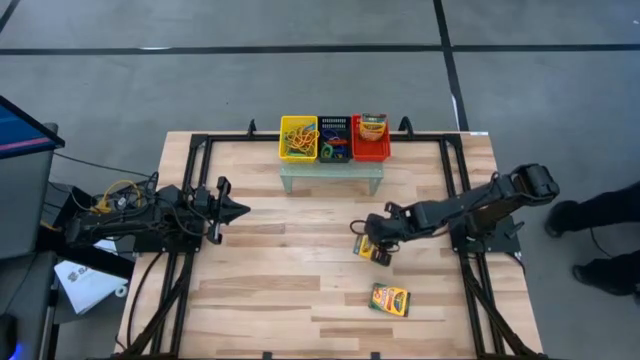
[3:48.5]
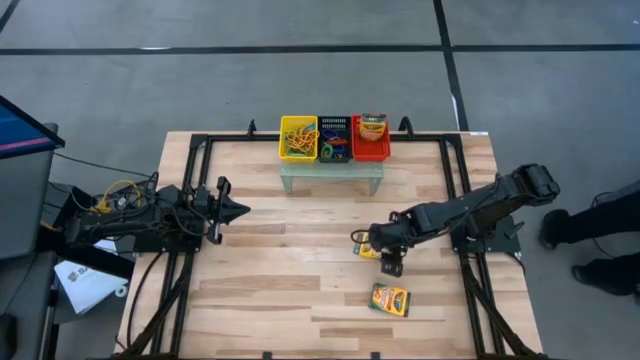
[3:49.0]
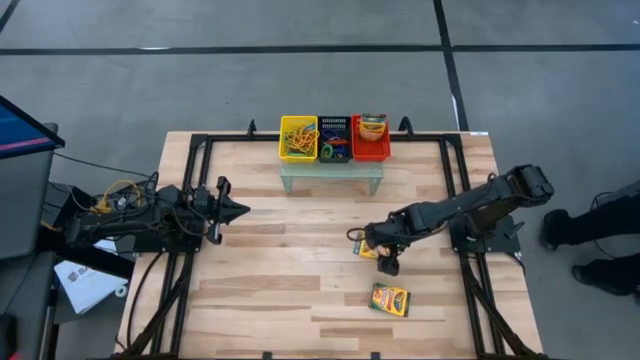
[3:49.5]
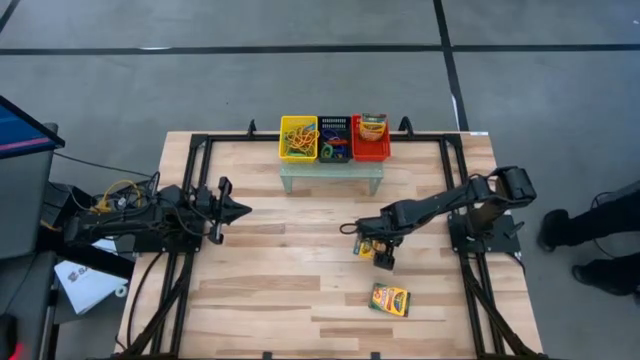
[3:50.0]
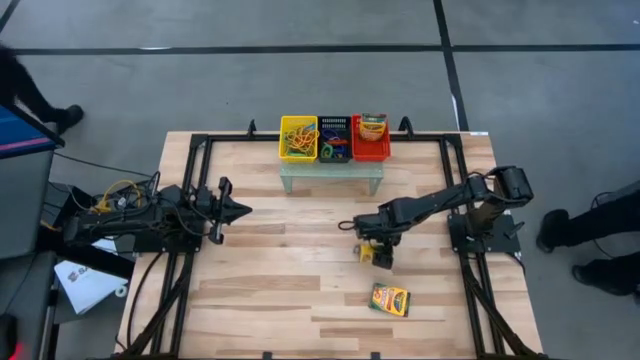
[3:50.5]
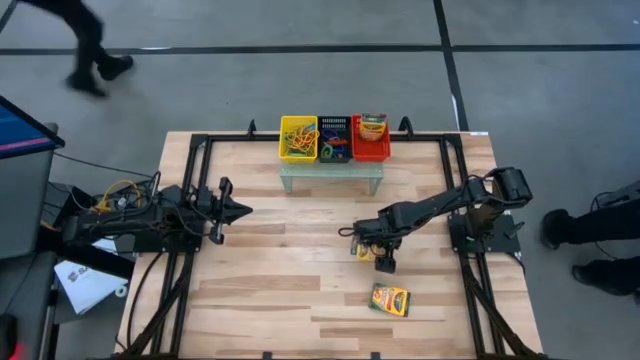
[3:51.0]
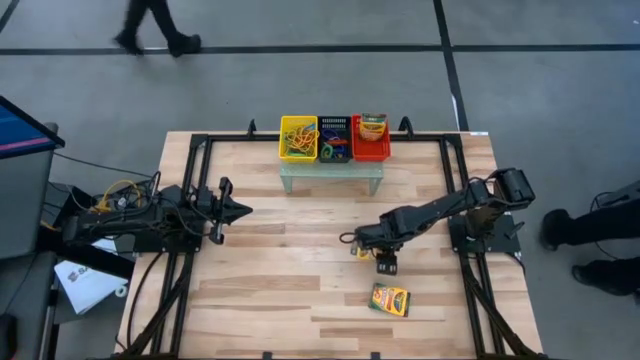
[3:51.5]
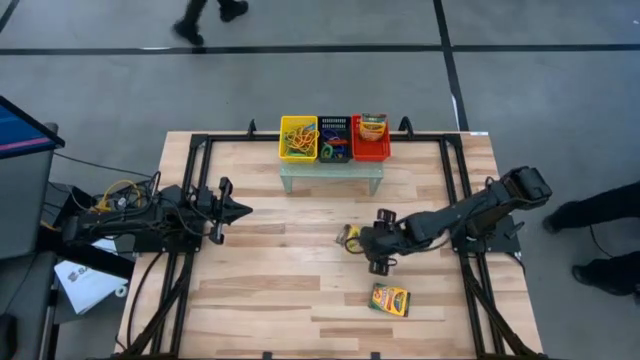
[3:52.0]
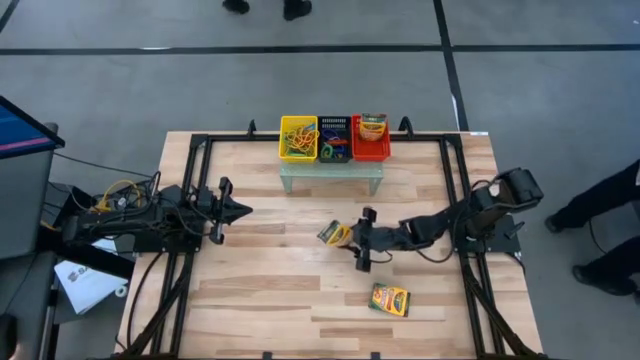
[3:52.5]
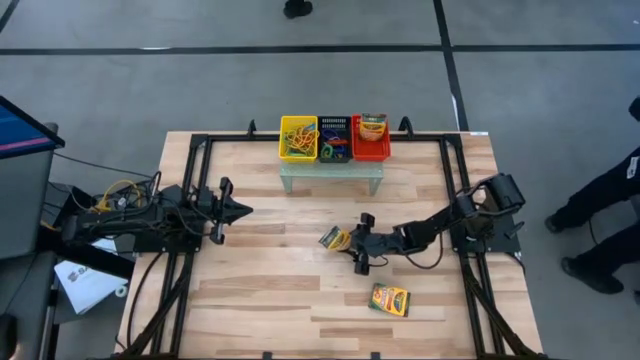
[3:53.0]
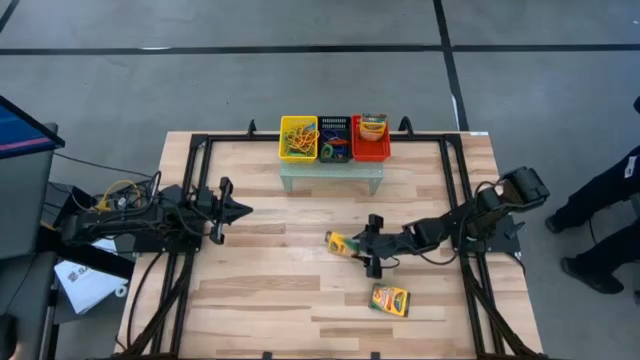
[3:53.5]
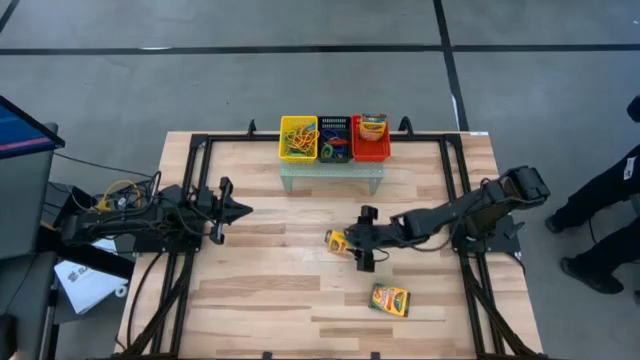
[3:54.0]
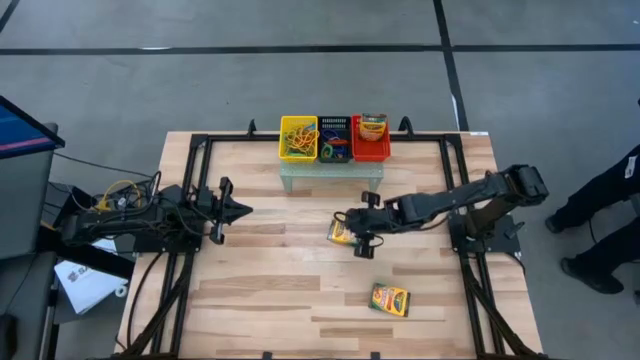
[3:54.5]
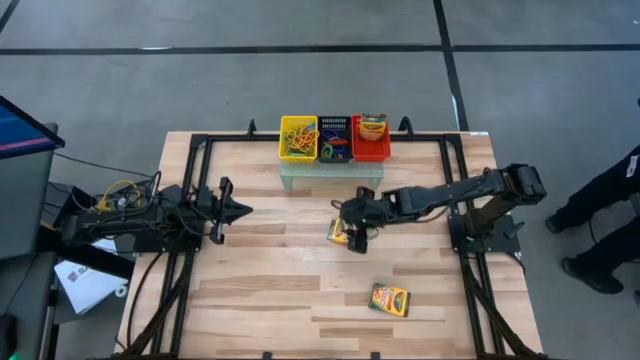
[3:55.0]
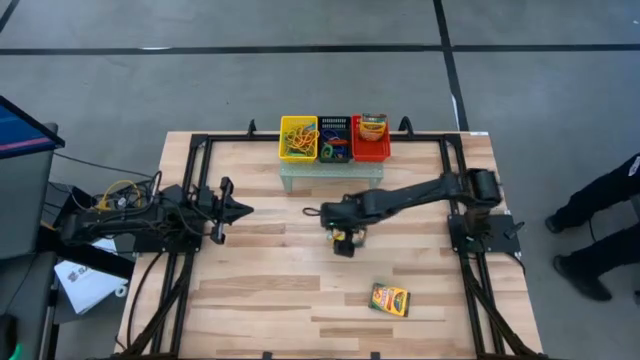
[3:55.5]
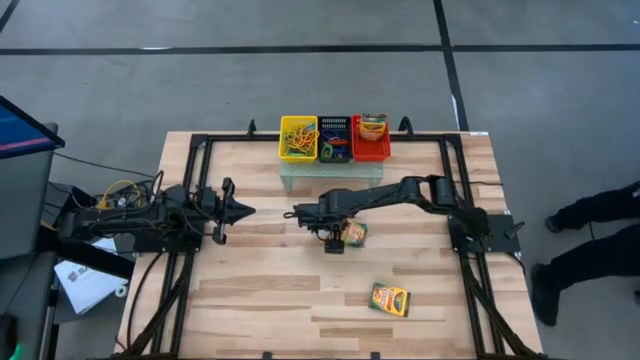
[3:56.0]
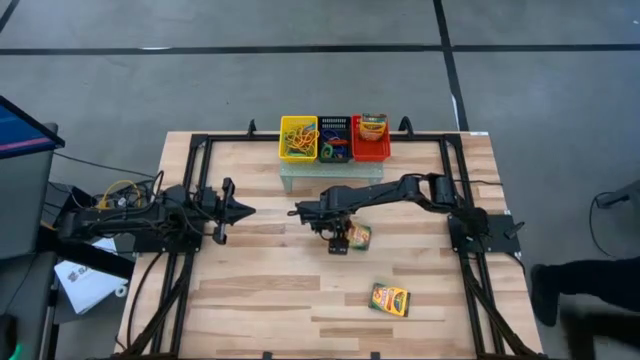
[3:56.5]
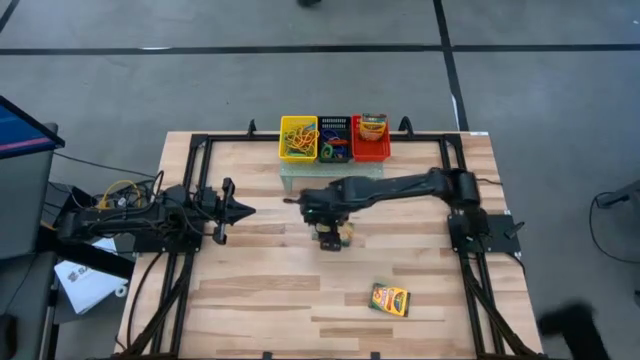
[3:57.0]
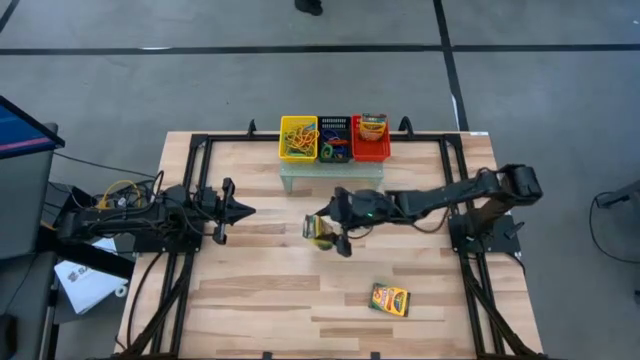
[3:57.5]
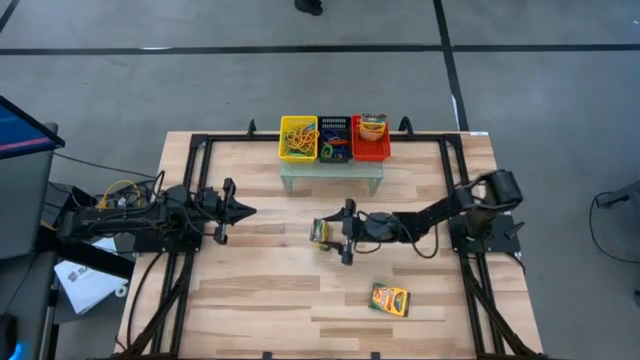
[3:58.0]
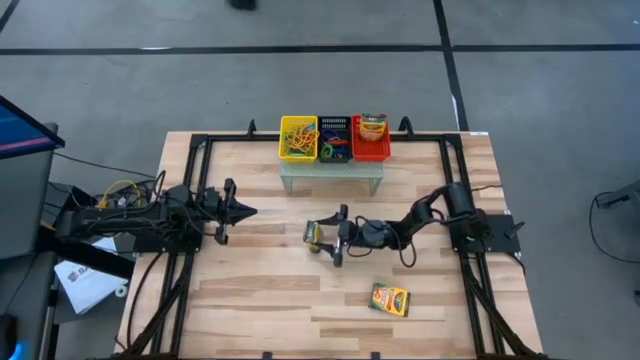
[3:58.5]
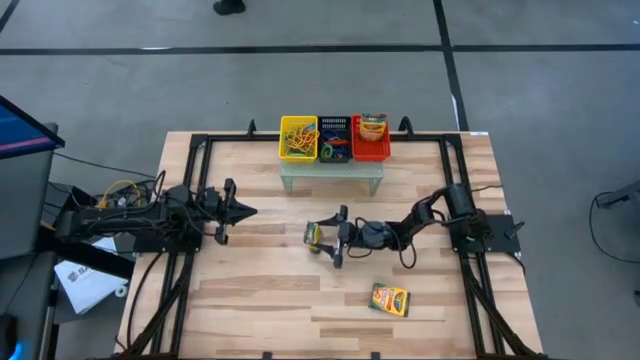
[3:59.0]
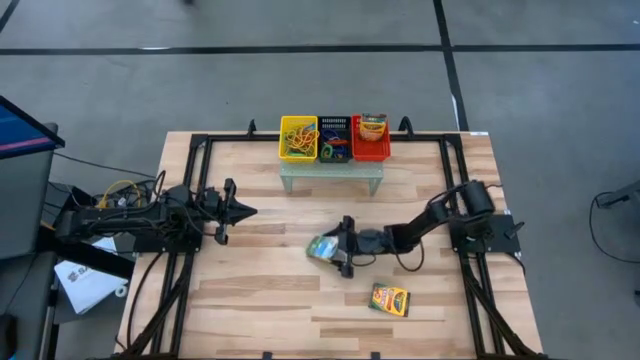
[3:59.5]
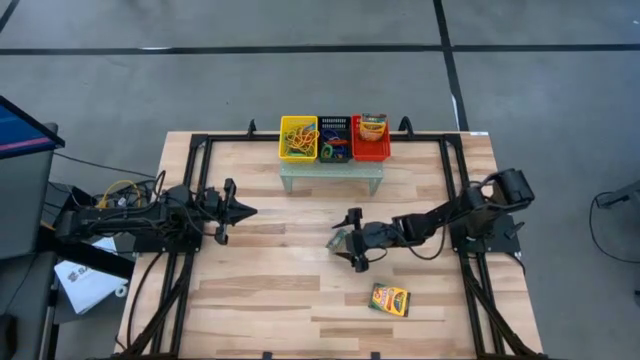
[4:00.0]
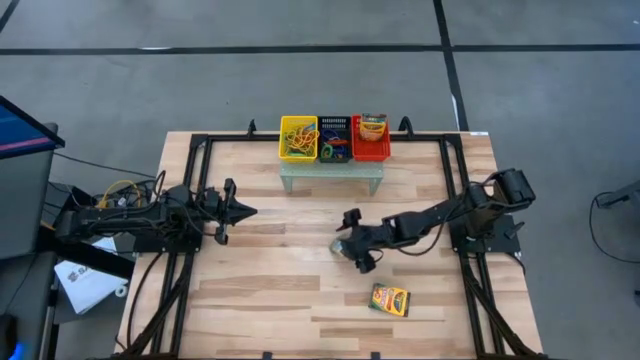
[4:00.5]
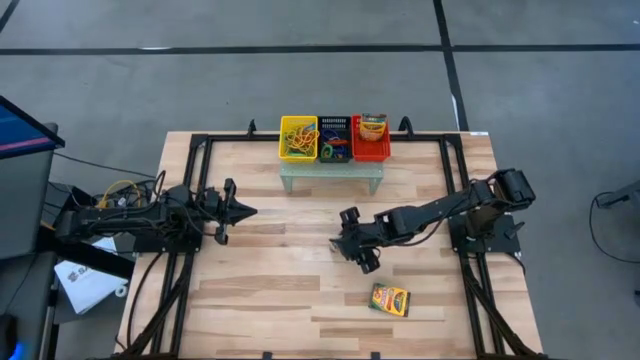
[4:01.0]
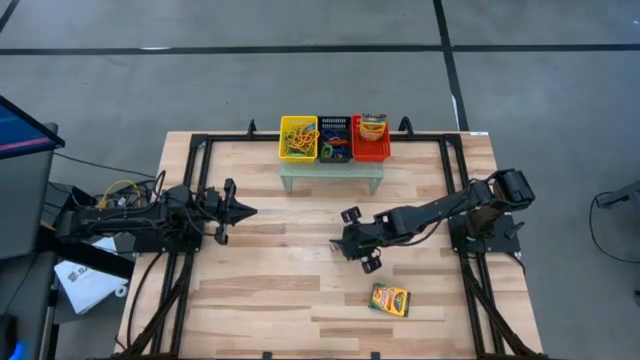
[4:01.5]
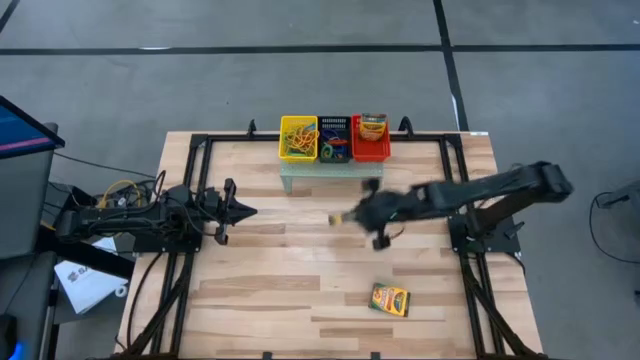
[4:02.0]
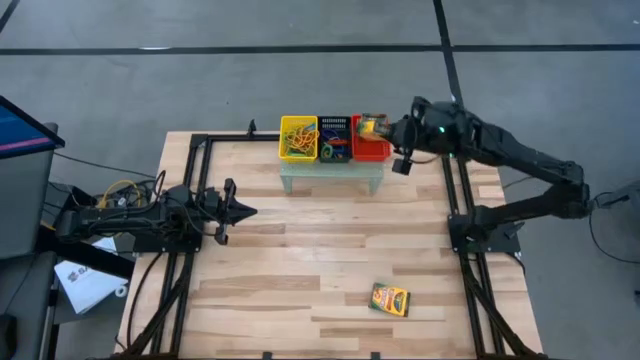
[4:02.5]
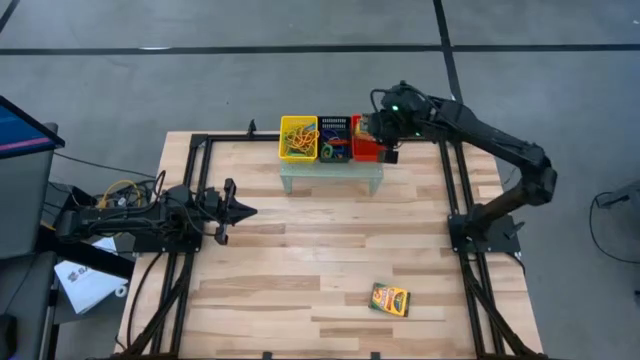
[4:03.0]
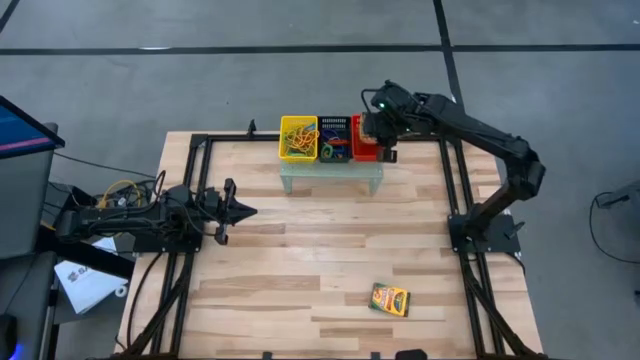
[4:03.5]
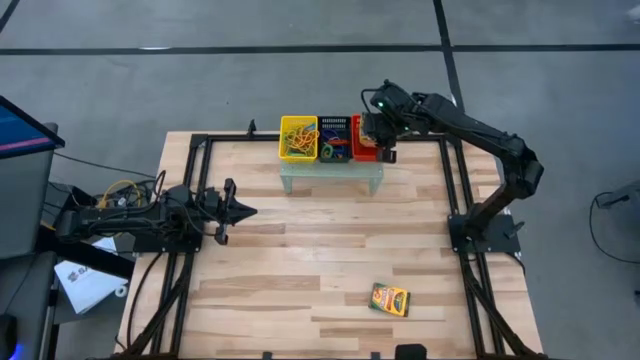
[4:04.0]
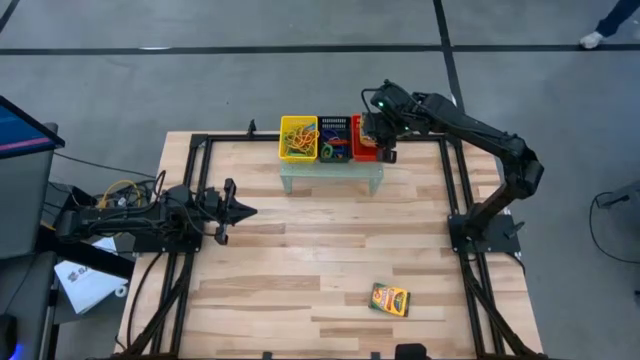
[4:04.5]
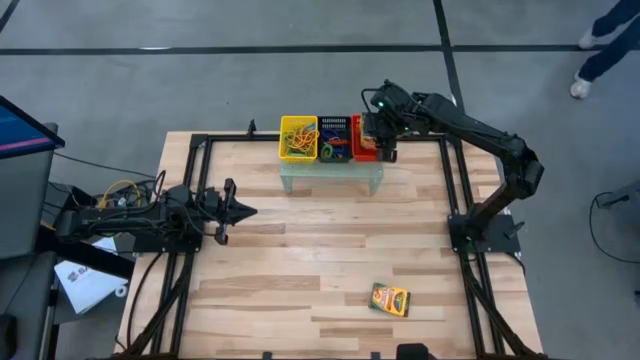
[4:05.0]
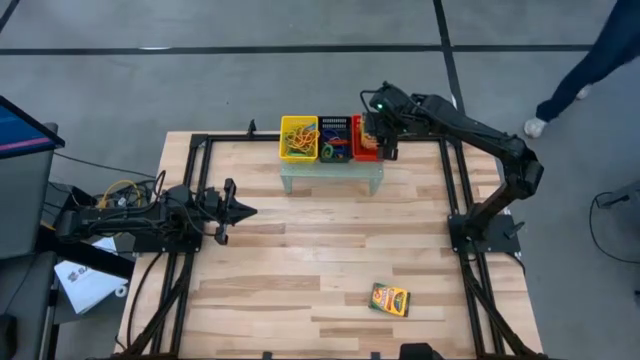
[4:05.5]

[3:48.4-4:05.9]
Task: Pick & Place Office Desk Supplies
Put the top yellow crayon box into the red bin on the shelf

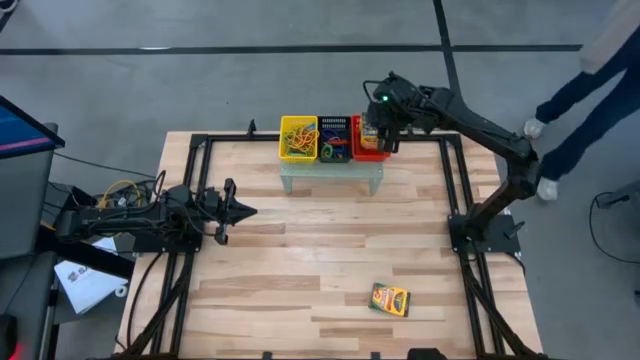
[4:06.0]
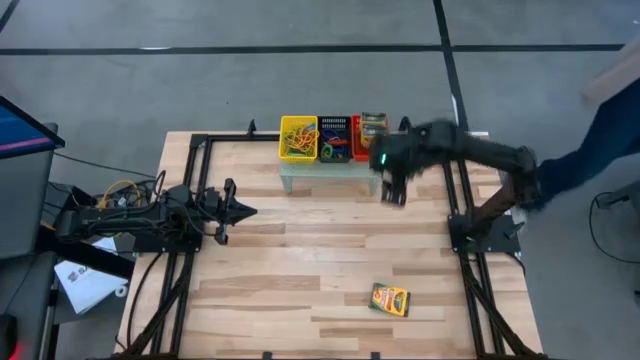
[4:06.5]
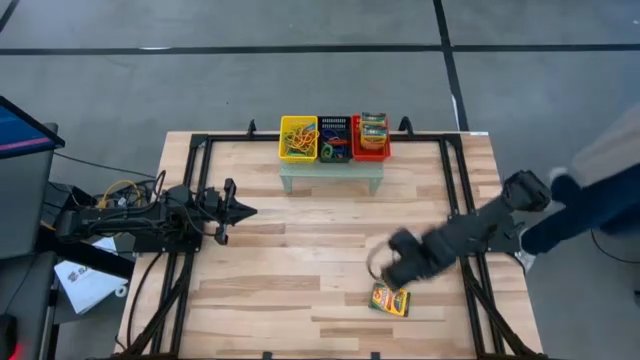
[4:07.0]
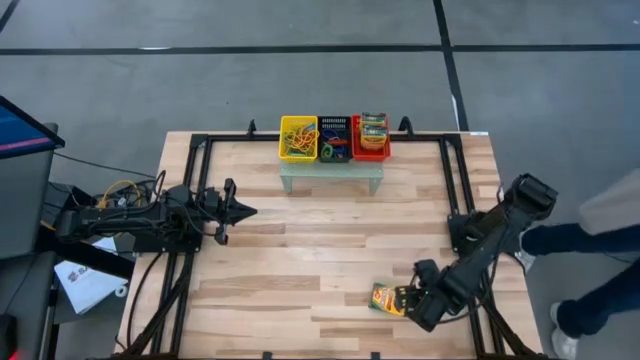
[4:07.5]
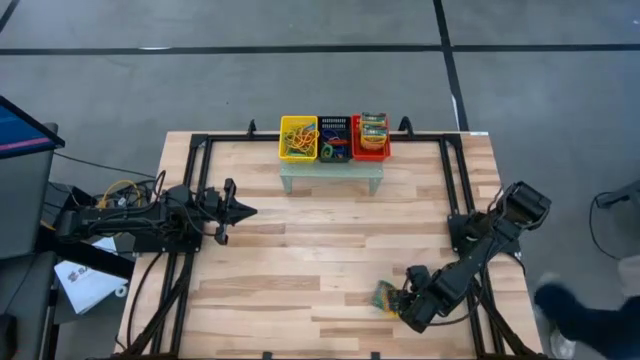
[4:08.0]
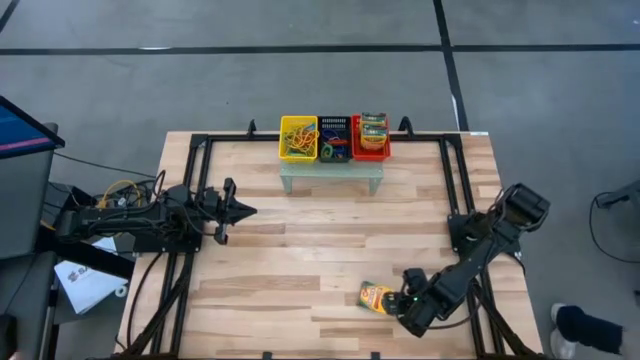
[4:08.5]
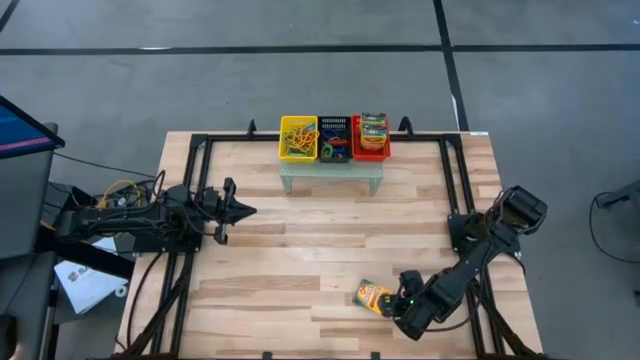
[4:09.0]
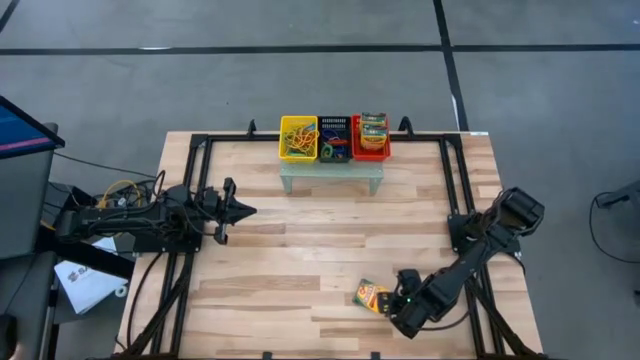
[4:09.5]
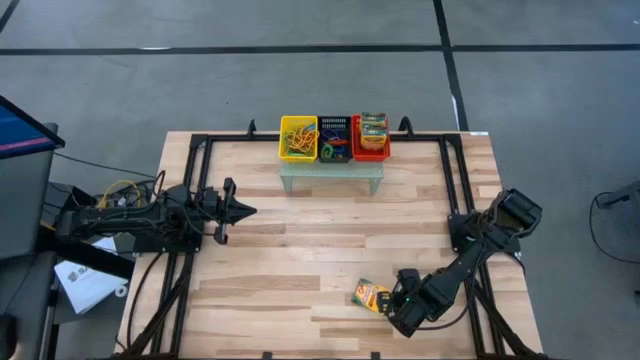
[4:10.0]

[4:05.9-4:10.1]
Put the yellow crayon box into the red bin on the shelf
